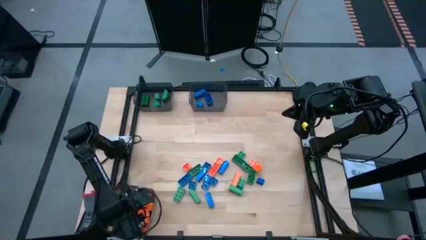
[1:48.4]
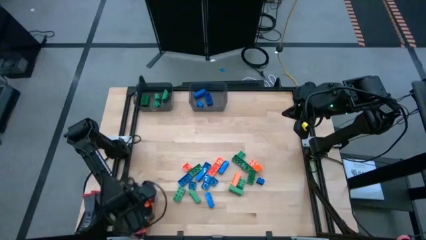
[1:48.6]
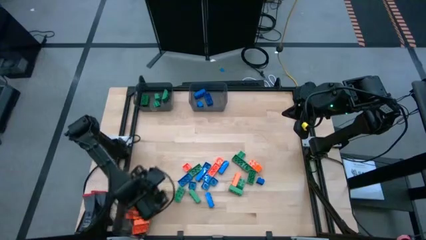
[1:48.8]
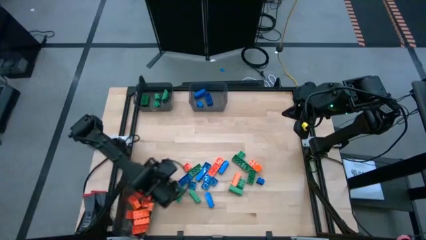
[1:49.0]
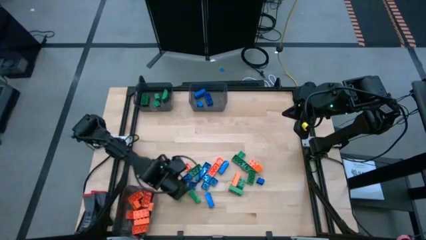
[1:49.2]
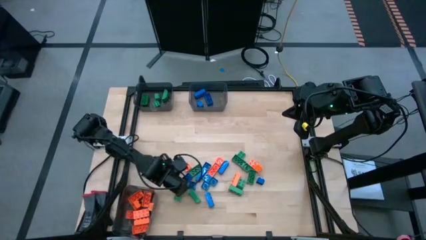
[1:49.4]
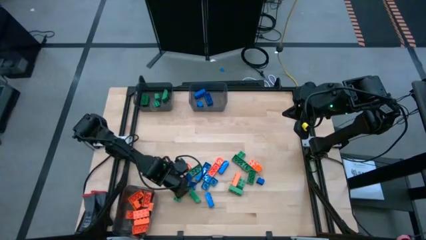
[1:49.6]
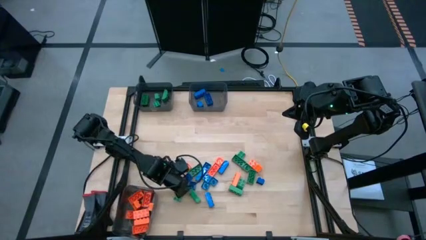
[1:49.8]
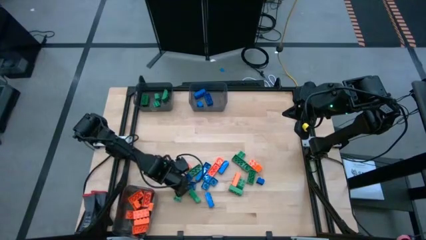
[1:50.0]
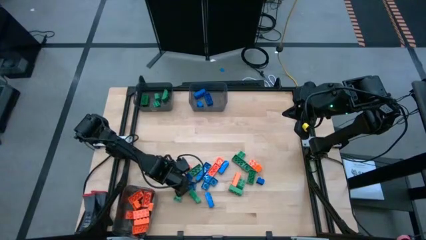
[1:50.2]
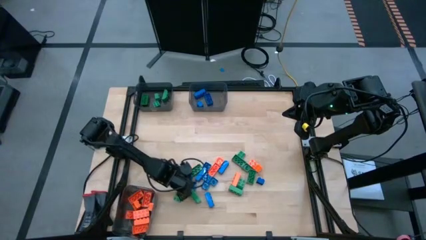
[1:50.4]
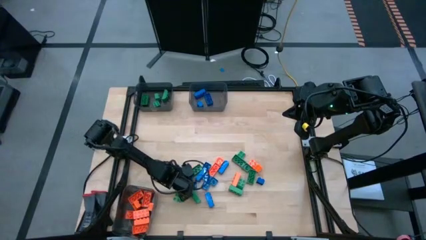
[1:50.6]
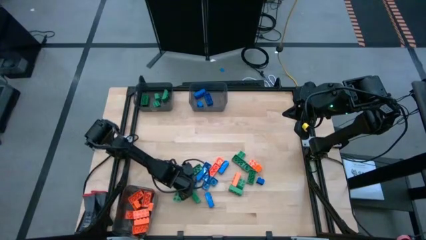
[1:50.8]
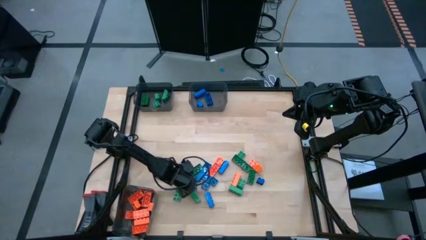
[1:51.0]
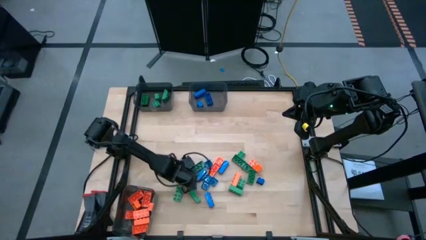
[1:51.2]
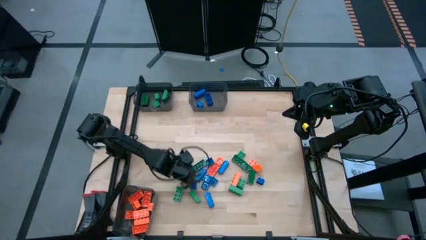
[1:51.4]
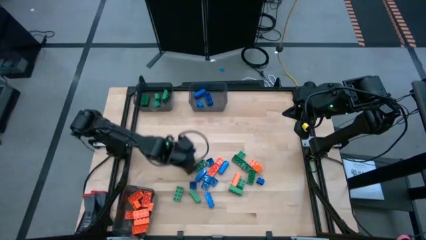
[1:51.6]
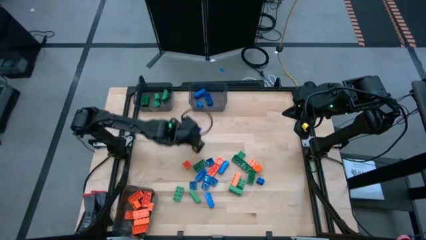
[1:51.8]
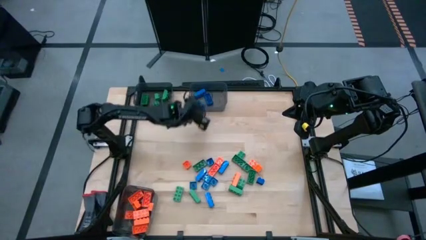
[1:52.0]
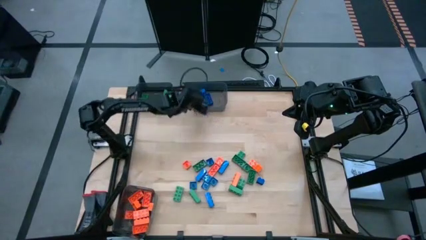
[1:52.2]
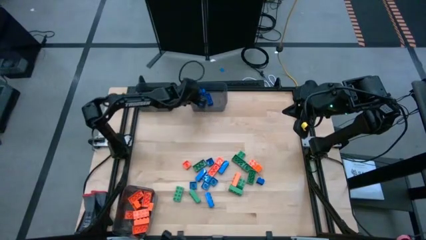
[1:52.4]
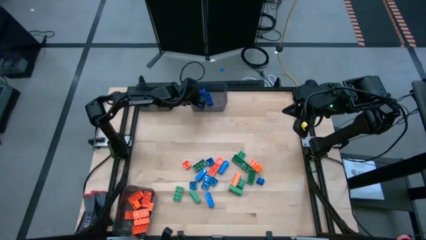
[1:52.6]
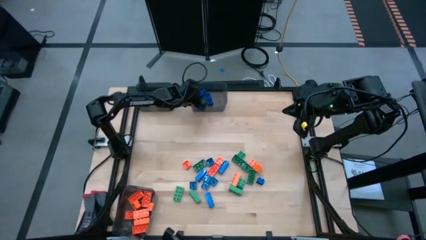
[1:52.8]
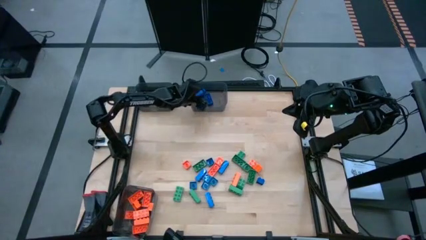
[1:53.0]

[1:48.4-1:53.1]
Task: Sort blocks
Put the blue gamepiece into the top right black bin

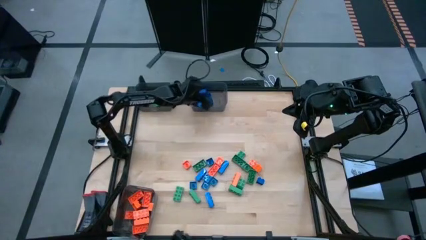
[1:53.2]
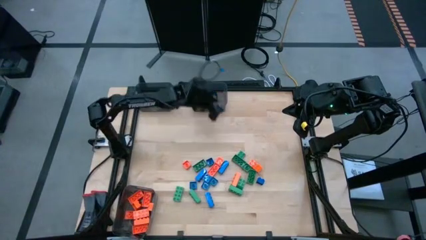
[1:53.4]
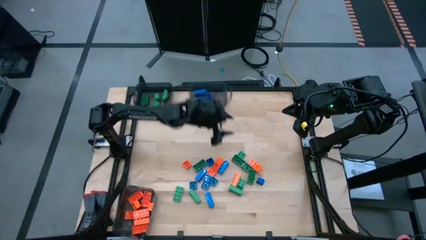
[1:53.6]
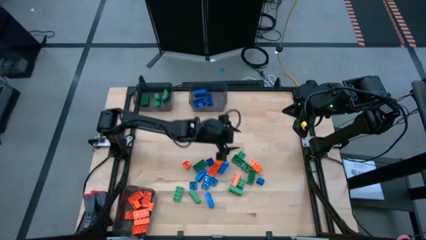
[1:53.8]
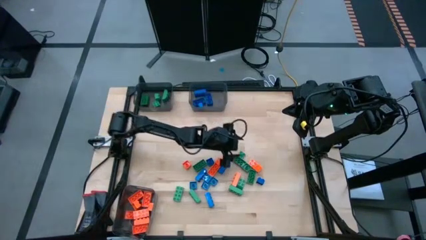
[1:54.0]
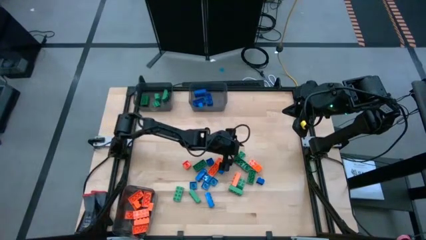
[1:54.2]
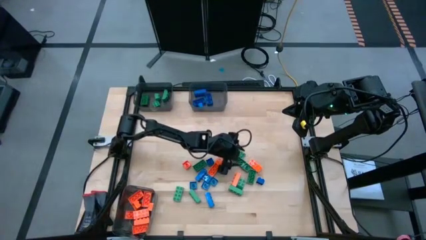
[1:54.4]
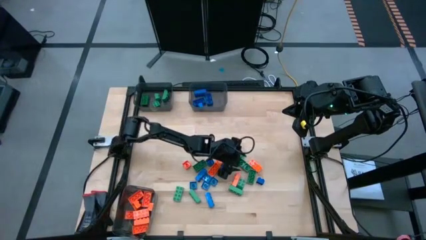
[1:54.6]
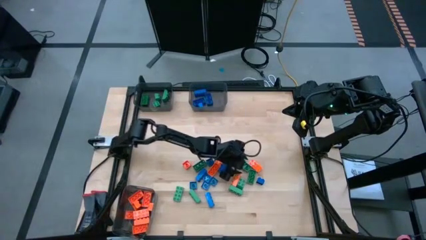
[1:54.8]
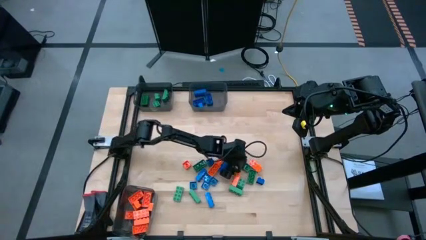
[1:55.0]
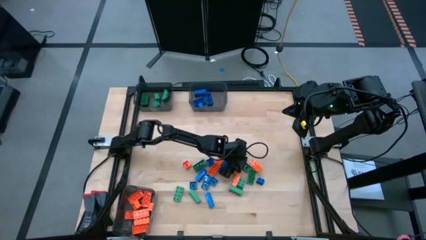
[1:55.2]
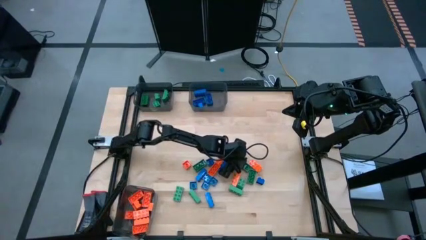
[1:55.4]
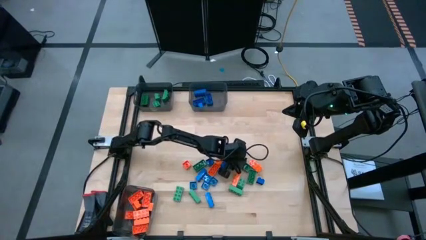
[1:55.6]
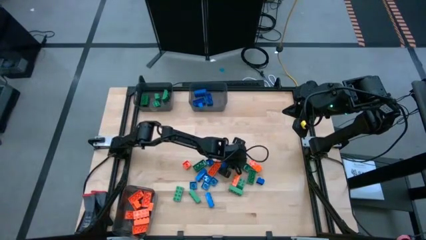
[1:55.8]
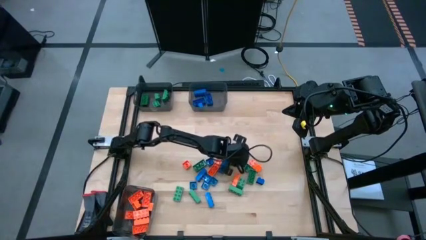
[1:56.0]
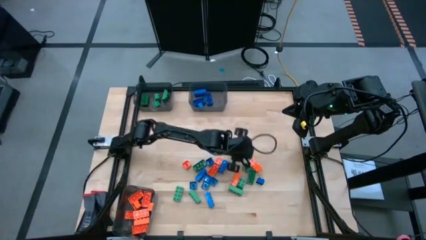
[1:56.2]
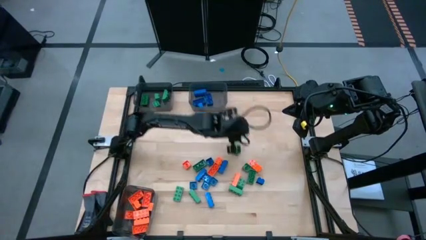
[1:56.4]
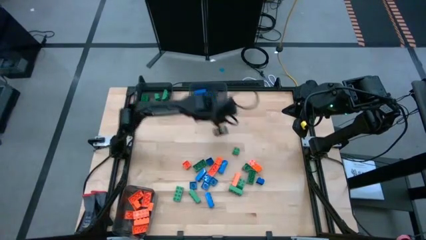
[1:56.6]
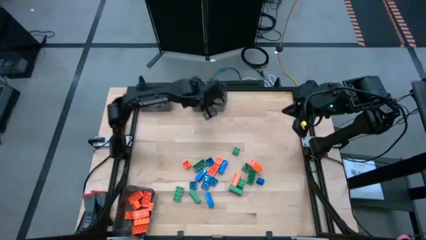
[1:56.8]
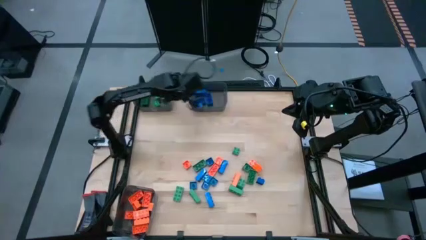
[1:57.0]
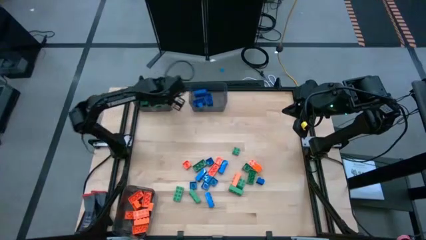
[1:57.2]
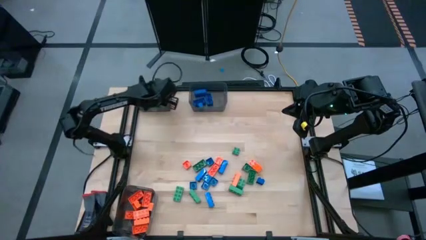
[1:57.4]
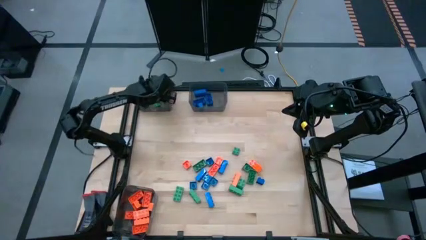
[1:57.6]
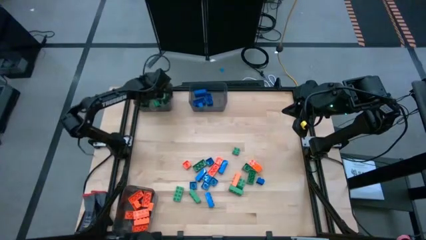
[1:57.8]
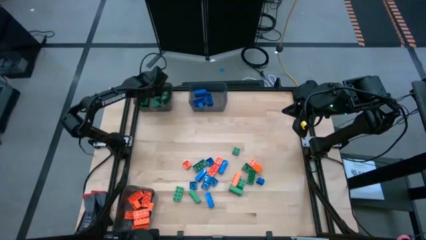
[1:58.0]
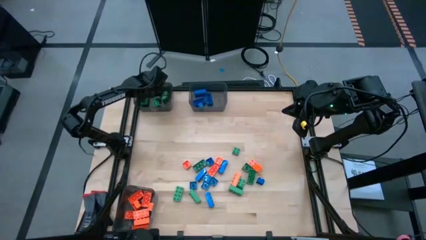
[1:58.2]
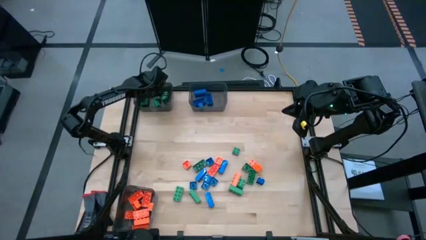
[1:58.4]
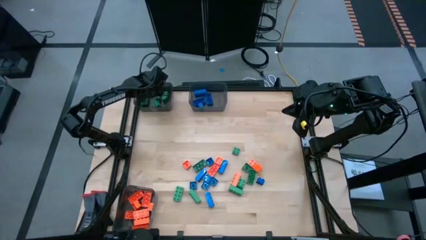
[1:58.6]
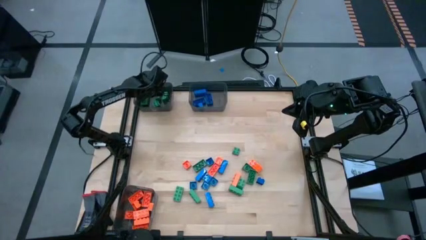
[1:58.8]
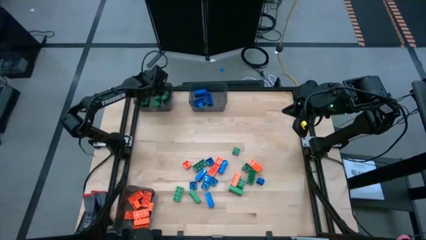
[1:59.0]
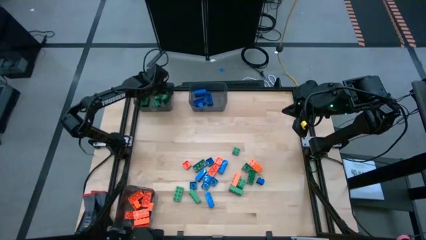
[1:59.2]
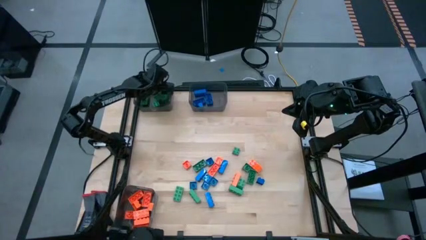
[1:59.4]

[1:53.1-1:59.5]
Put the green gamepiece into the top left black bin

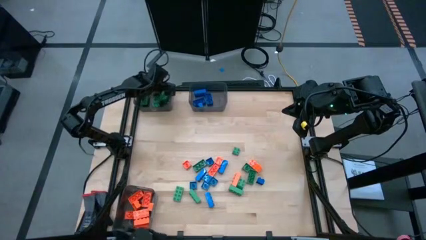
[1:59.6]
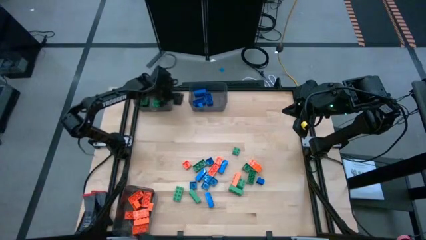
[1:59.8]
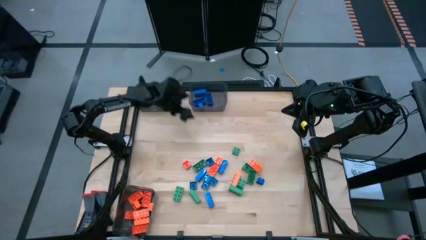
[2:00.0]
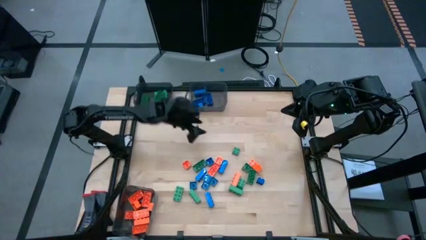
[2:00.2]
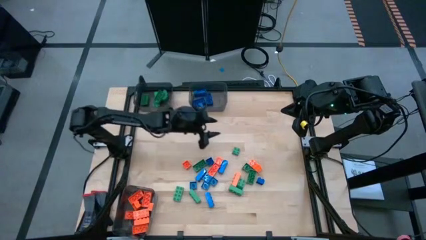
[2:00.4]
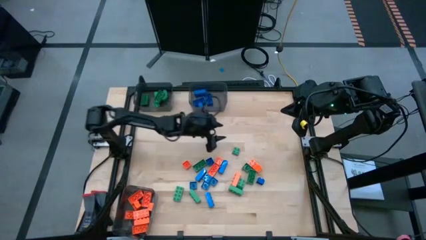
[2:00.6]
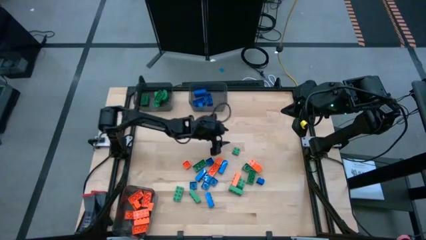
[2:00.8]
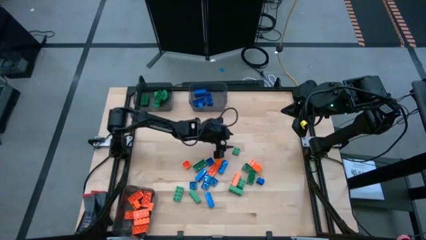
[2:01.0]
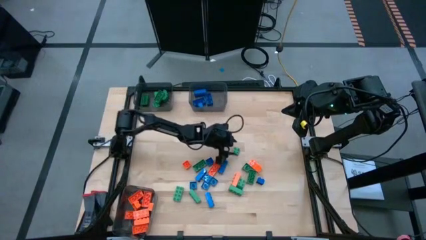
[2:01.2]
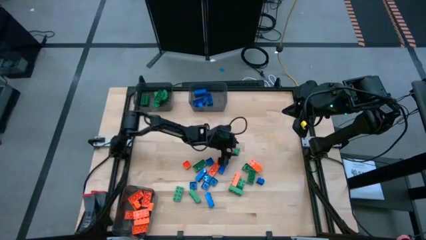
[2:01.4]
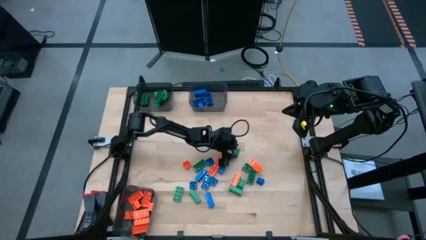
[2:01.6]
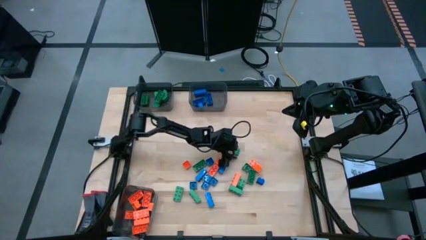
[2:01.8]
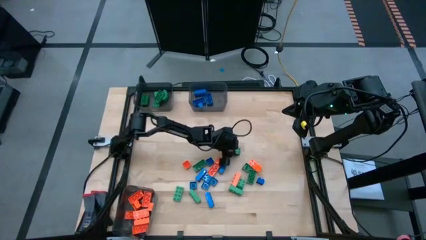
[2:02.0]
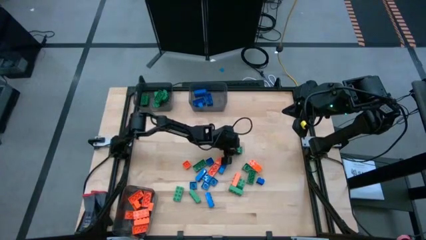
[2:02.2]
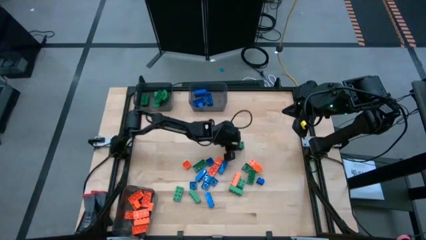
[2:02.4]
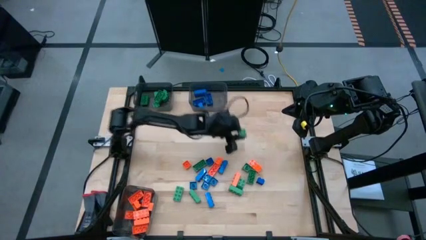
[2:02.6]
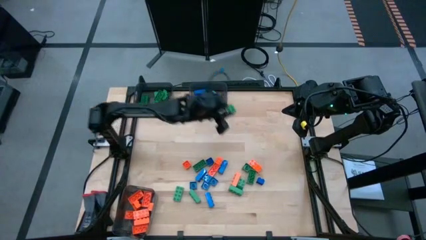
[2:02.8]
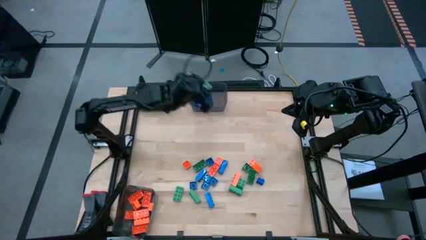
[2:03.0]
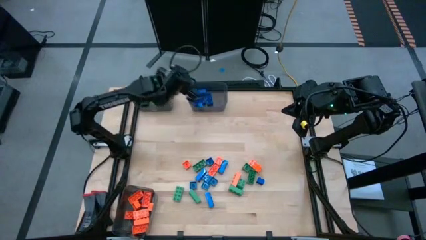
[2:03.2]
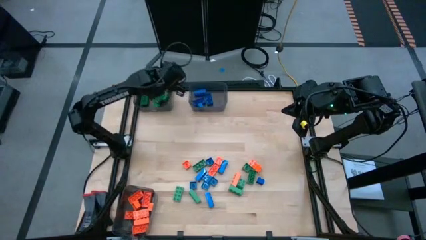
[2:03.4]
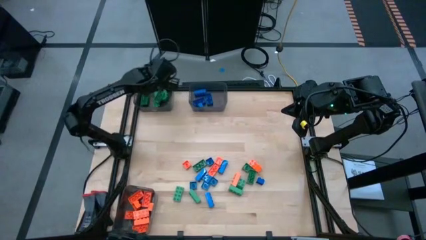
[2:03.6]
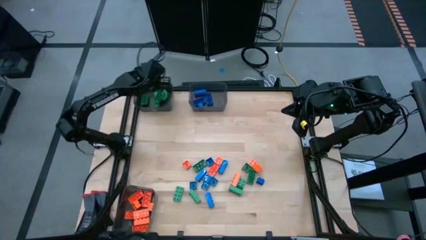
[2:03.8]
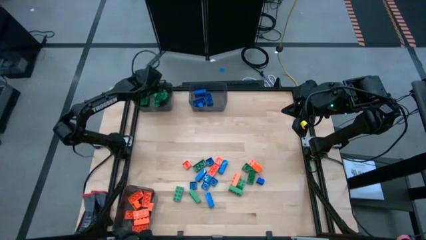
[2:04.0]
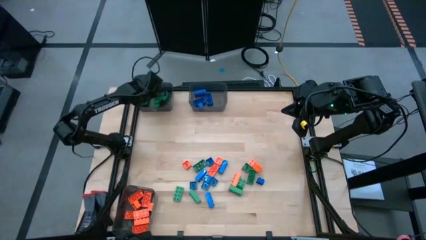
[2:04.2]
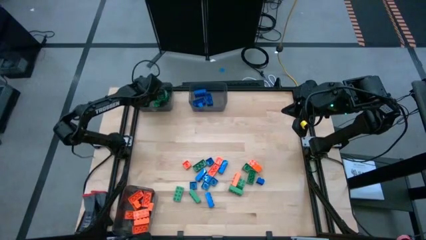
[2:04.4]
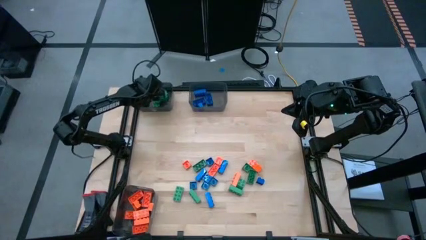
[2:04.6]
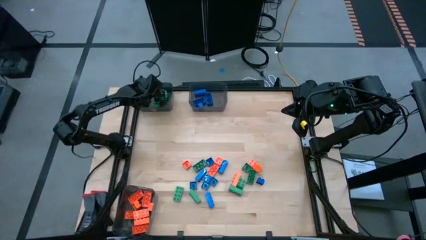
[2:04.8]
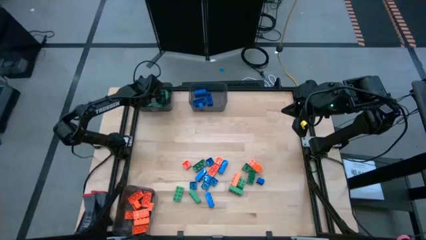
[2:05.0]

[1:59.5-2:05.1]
Put the green gamepiece into the top left black bin
